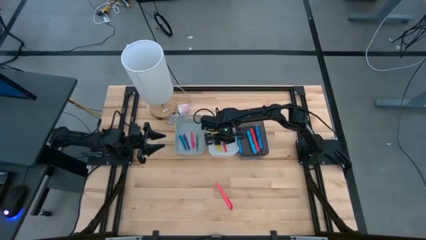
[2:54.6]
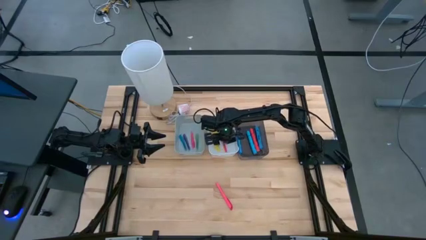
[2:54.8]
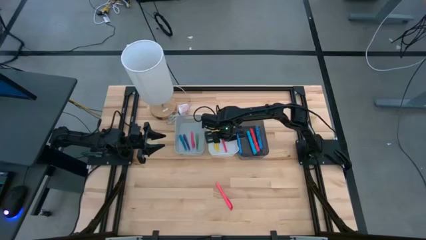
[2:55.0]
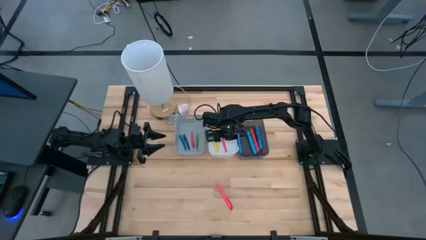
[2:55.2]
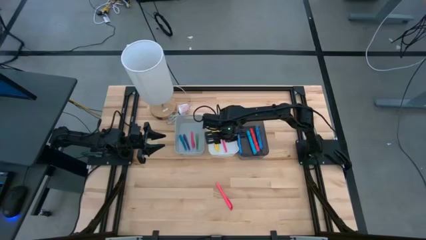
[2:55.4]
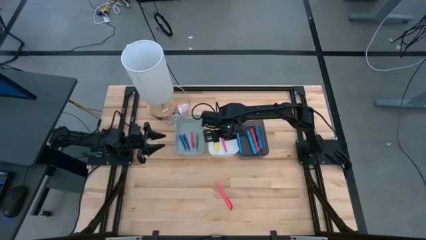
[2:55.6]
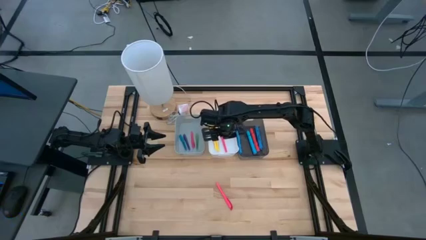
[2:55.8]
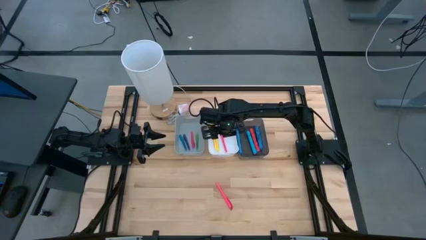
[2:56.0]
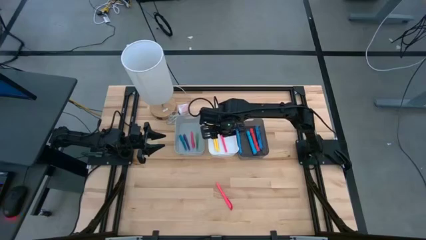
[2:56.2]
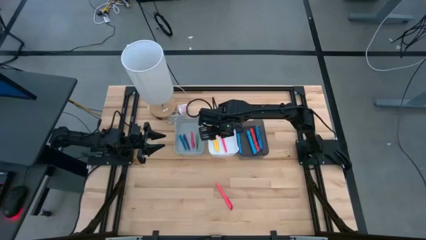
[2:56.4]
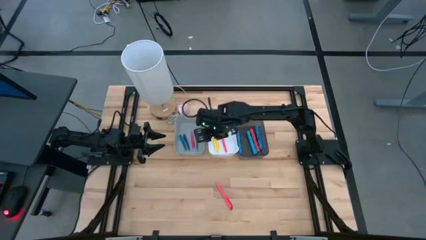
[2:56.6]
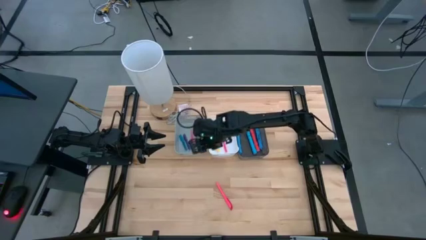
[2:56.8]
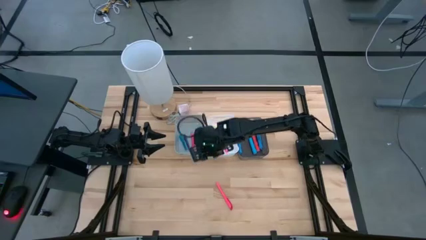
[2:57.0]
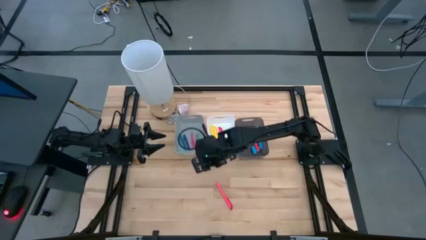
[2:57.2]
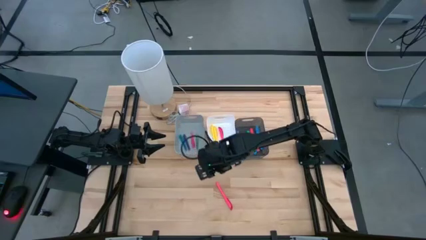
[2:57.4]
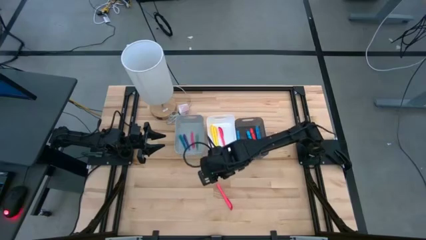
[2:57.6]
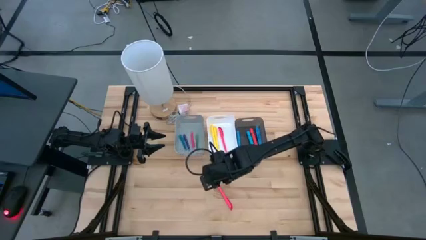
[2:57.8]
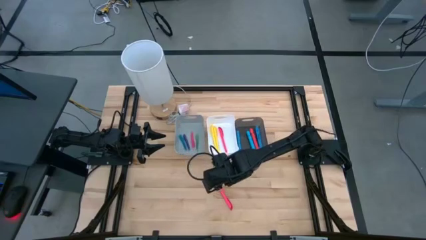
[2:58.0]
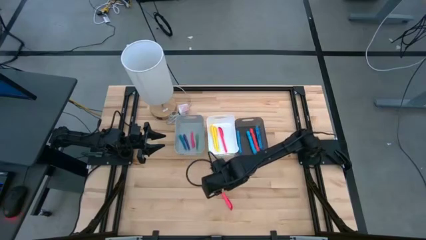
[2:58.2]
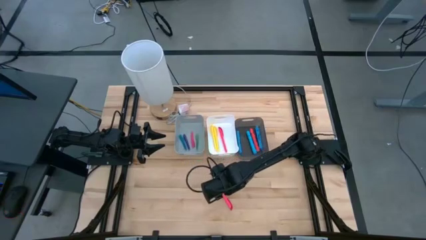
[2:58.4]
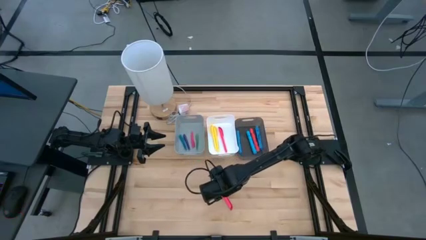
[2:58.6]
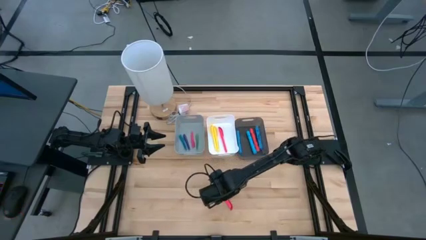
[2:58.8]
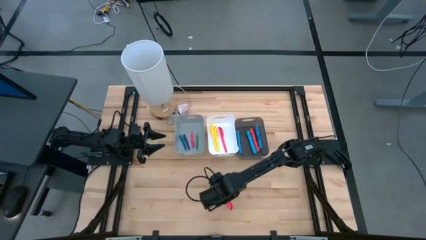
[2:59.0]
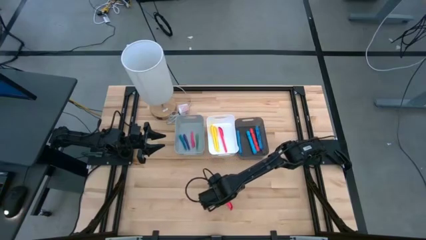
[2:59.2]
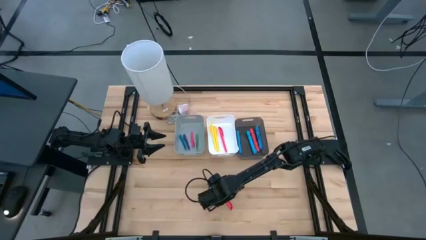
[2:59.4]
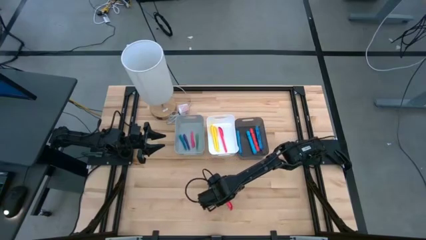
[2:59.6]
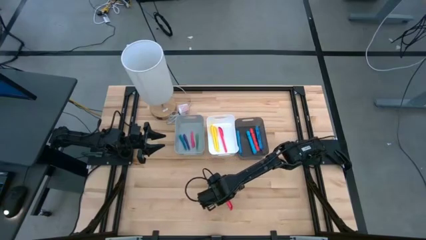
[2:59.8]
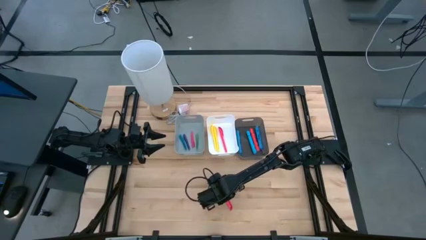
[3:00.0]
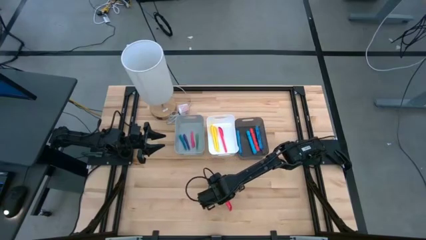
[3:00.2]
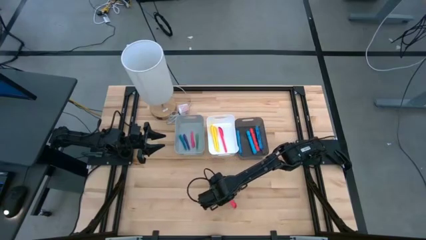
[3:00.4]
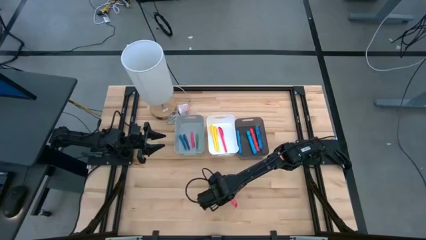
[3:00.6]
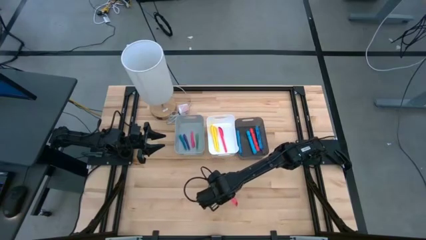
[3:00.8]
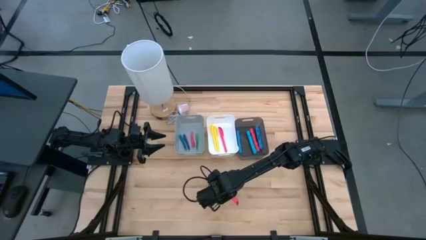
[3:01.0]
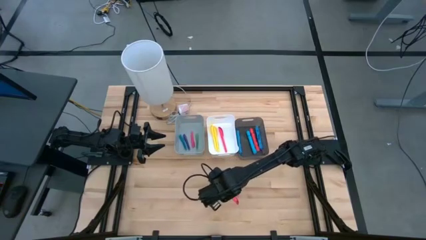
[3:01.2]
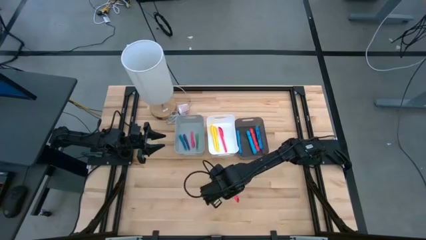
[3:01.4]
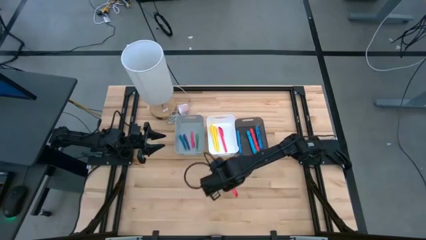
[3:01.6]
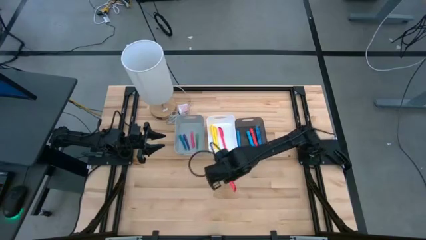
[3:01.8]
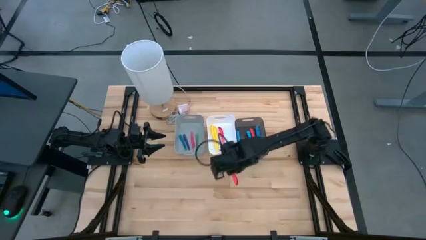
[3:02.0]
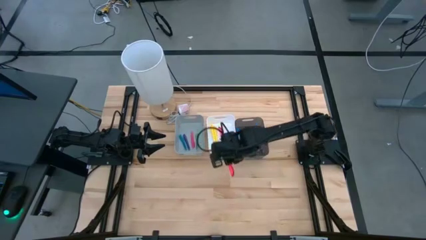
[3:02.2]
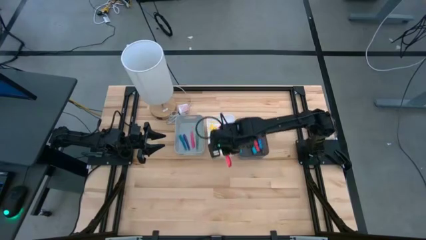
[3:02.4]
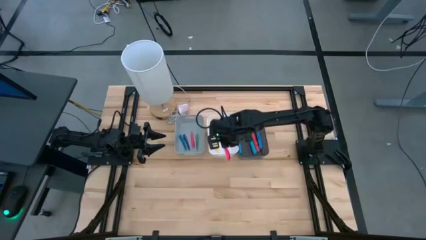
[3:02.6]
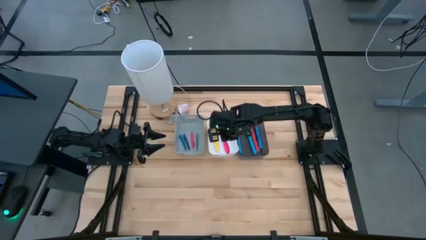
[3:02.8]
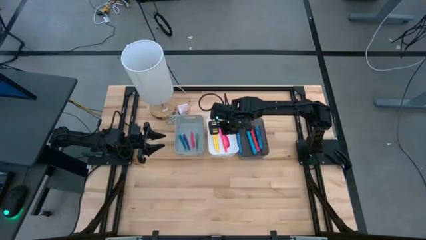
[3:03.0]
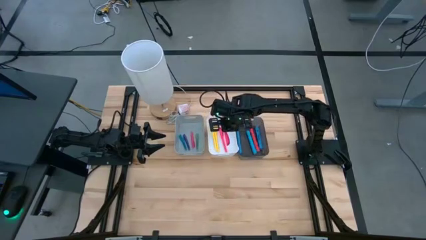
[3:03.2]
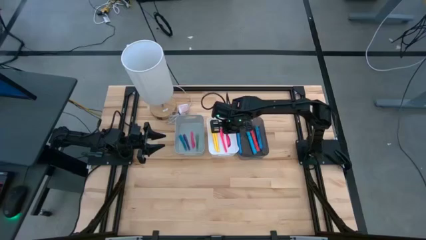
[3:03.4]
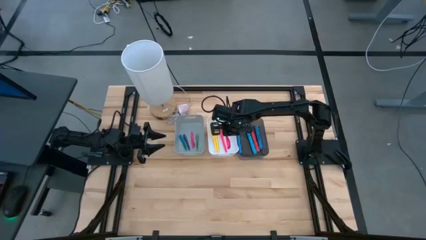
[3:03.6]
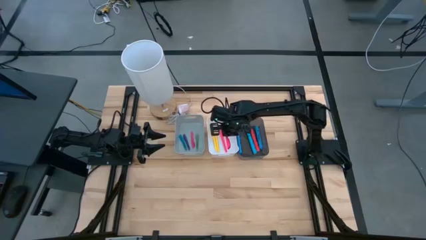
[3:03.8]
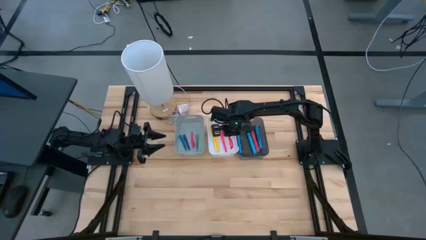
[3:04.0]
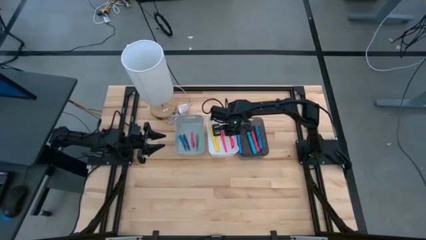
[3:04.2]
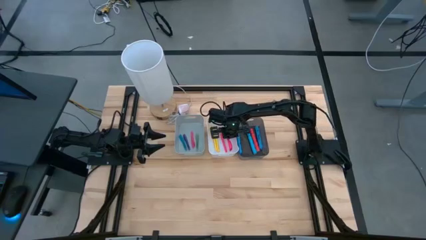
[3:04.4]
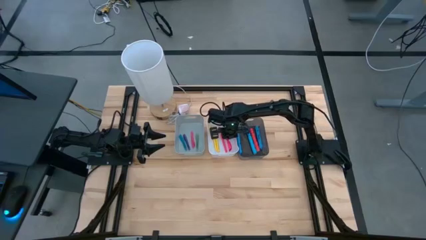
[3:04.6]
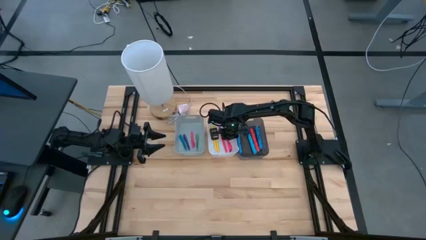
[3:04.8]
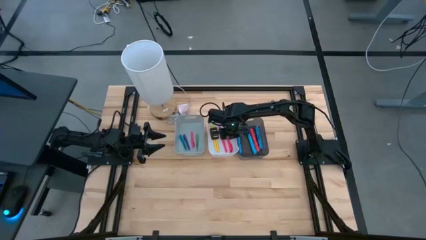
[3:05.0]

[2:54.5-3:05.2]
Task: Pick & Place Markers
Put the pink highlighter pen into the white bin

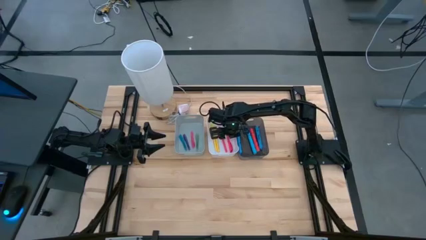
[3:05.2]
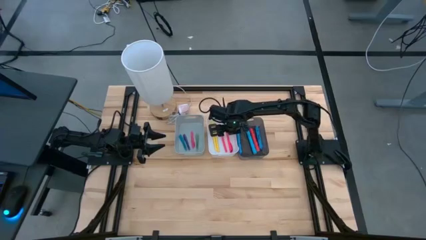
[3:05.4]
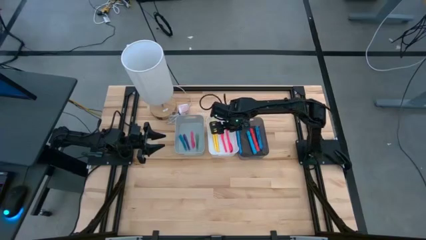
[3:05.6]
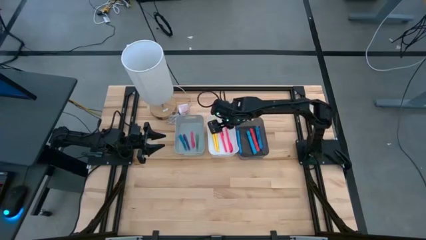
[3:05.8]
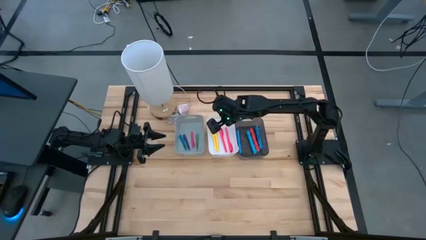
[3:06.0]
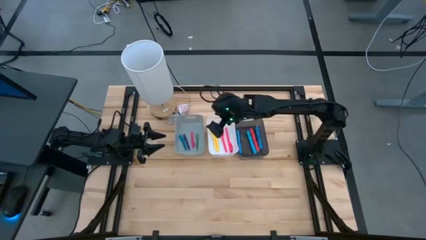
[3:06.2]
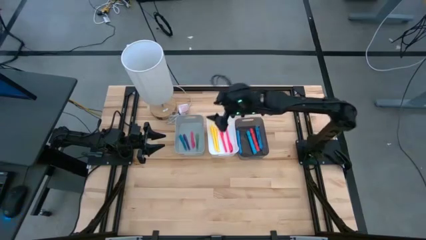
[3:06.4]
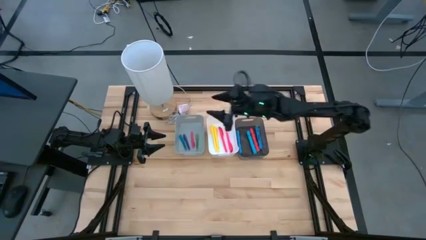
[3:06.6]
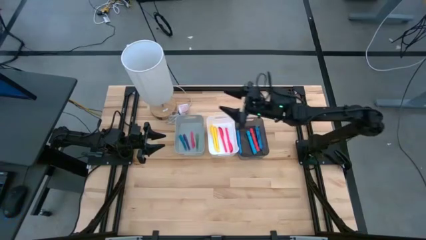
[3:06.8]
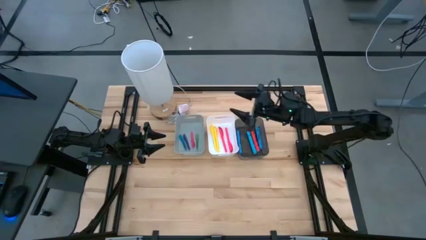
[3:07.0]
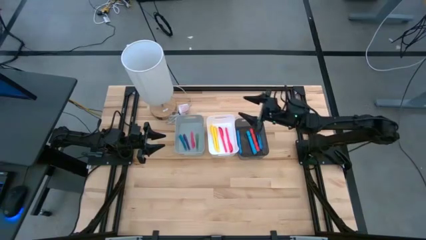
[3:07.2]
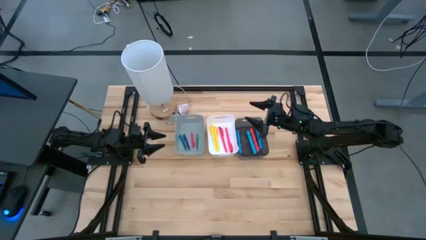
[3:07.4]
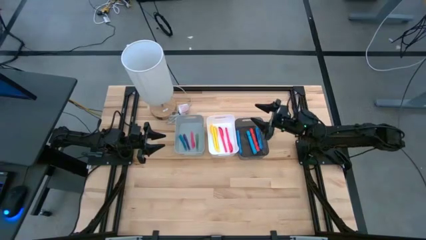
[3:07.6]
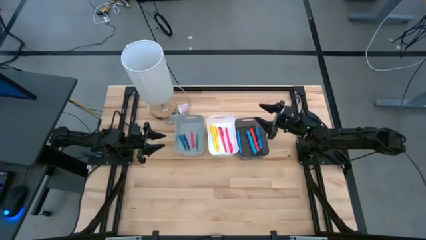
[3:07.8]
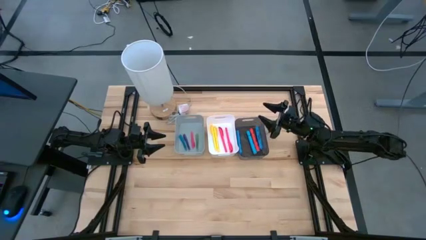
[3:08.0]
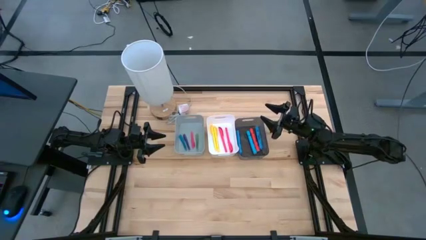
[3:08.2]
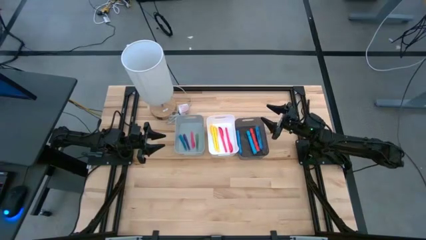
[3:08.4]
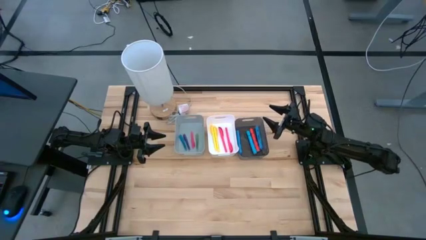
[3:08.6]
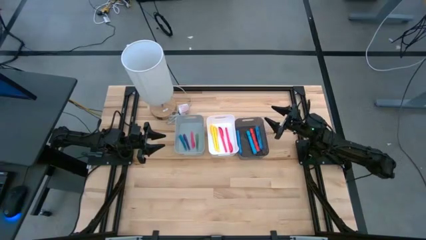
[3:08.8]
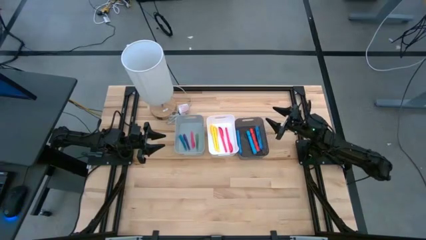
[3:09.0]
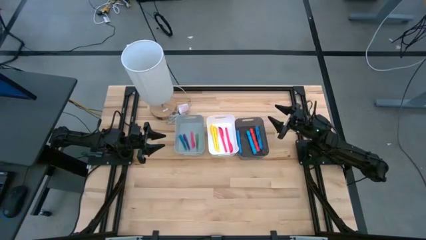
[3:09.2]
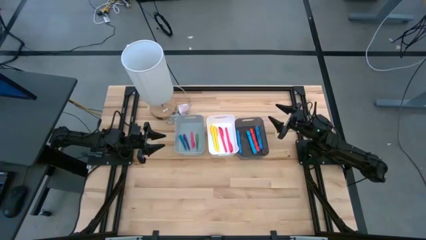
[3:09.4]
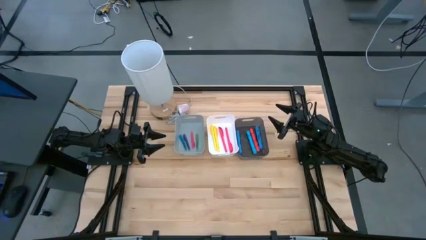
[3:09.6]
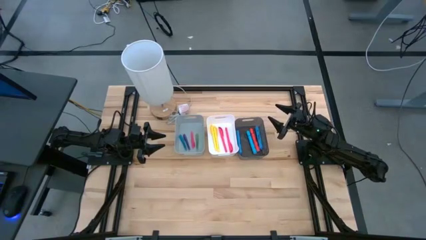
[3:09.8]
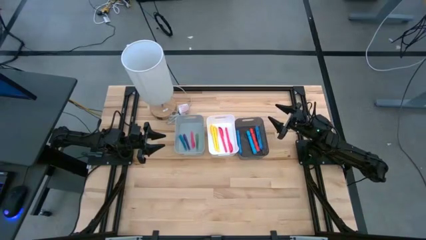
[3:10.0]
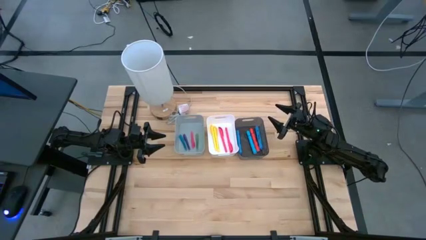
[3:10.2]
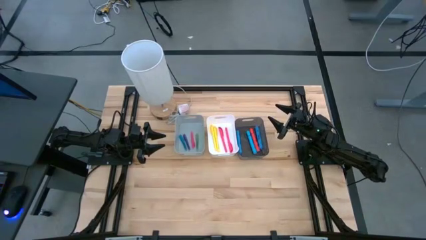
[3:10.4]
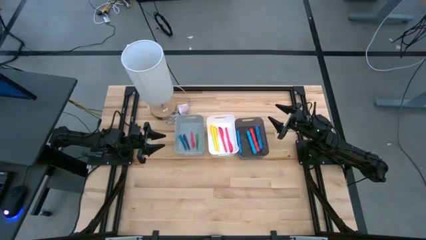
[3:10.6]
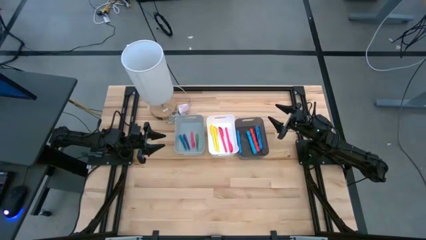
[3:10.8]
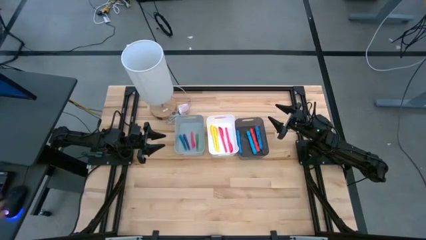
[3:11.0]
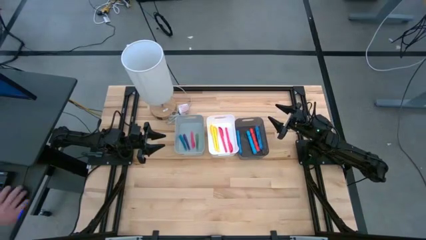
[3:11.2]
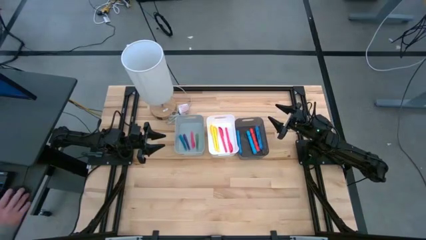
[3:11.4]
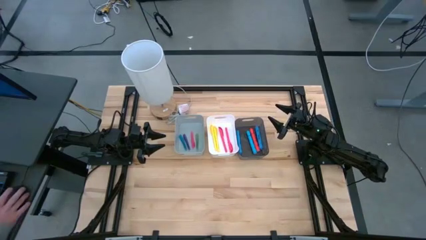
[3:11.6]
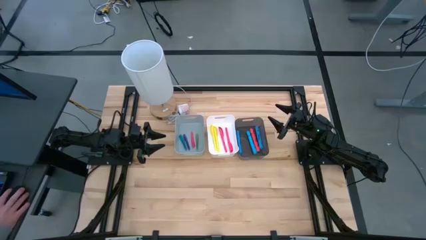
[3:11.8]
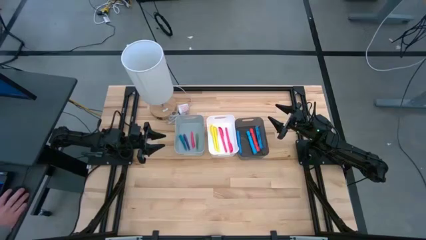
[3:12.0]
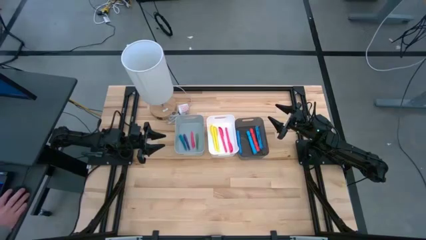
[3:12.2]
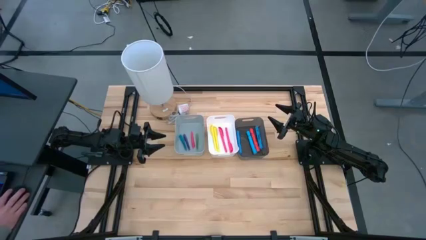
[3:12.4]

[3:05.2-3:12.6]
Return to Home Position
